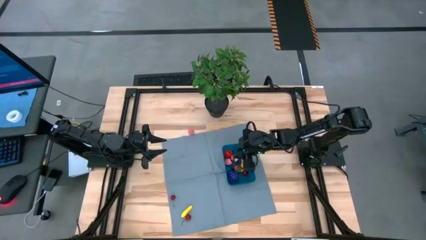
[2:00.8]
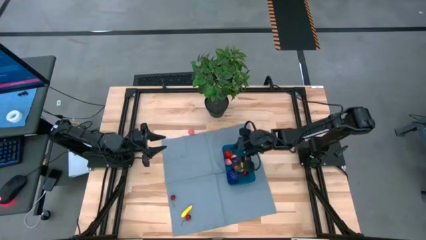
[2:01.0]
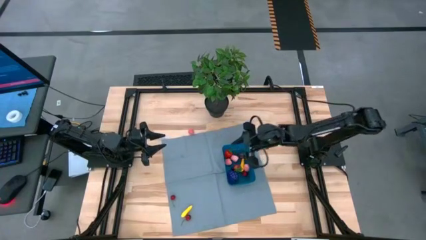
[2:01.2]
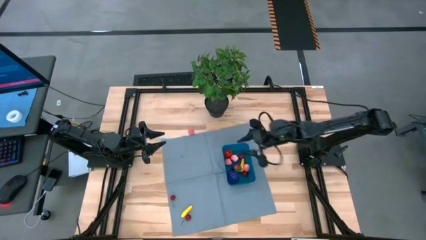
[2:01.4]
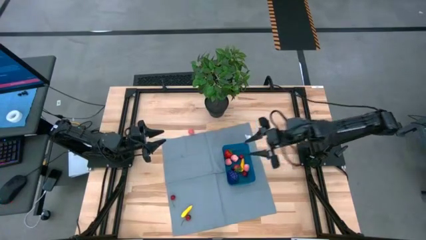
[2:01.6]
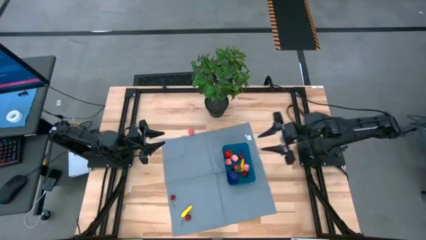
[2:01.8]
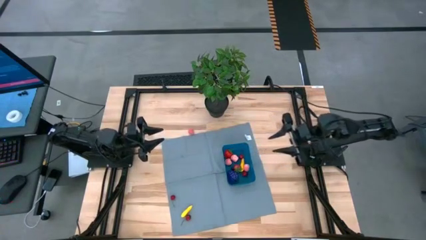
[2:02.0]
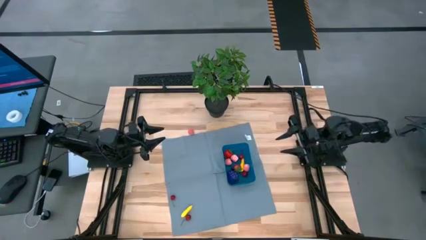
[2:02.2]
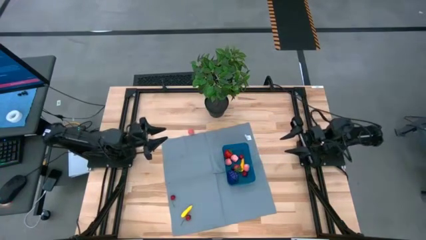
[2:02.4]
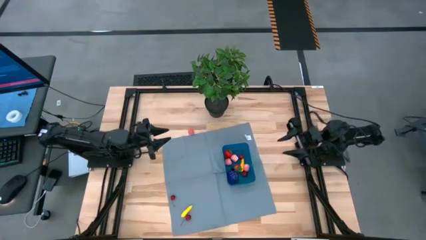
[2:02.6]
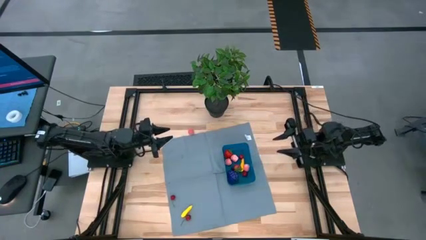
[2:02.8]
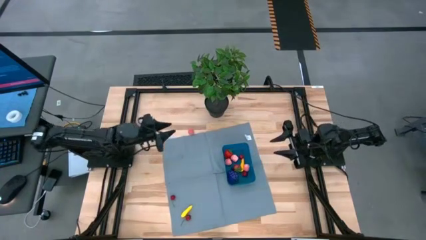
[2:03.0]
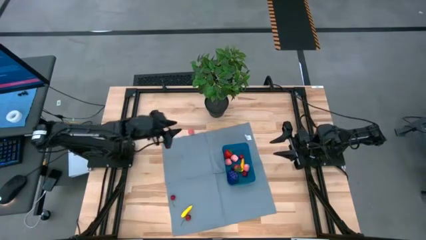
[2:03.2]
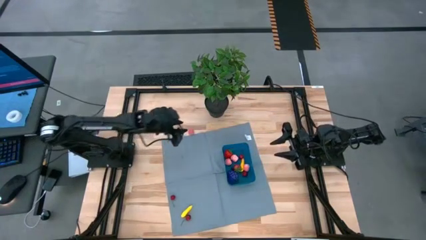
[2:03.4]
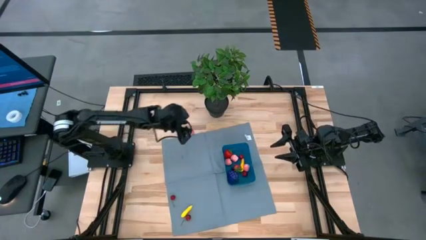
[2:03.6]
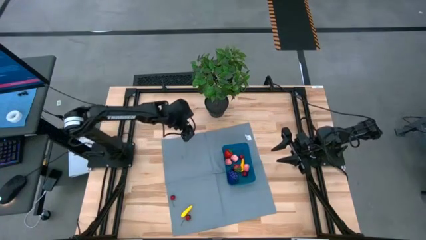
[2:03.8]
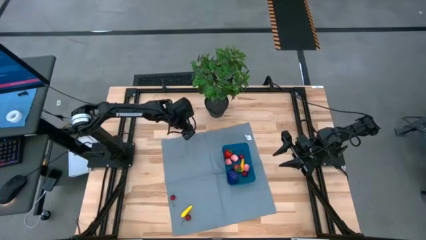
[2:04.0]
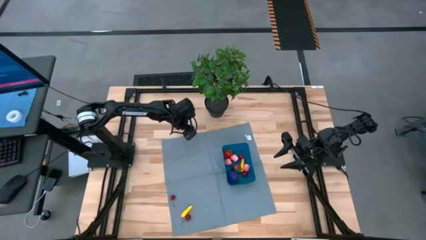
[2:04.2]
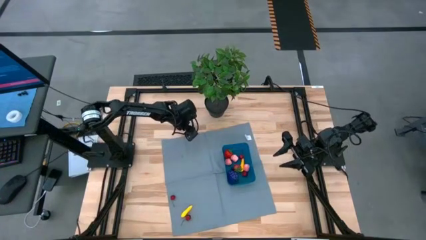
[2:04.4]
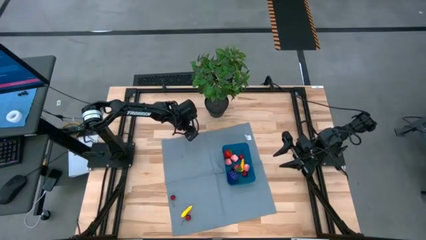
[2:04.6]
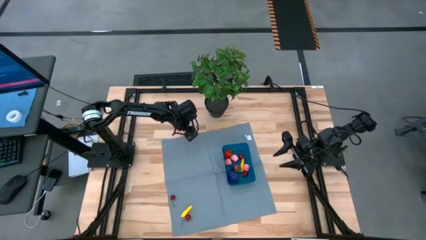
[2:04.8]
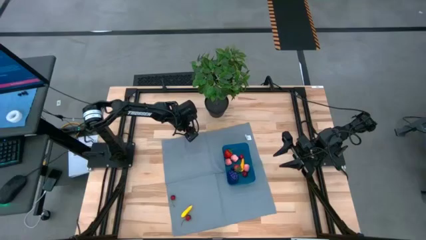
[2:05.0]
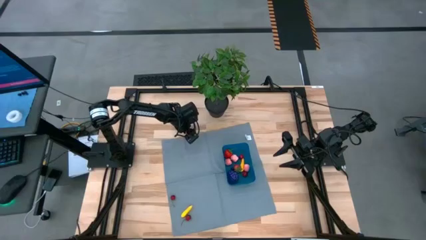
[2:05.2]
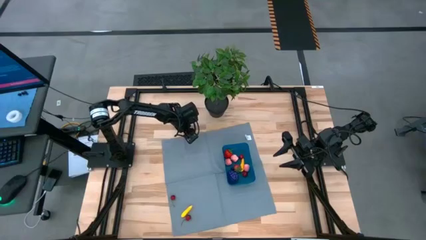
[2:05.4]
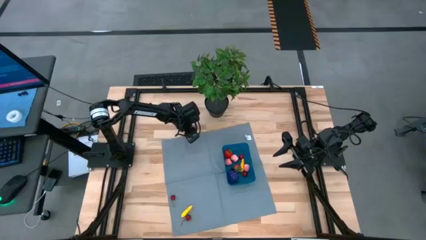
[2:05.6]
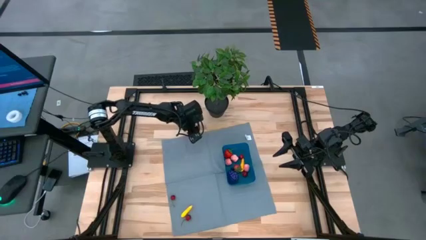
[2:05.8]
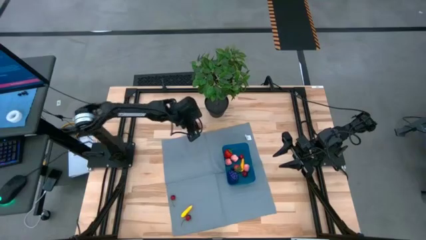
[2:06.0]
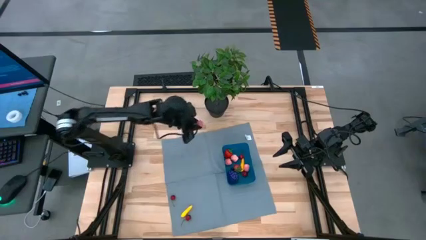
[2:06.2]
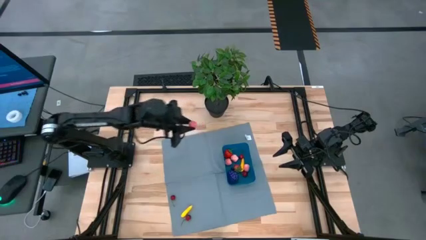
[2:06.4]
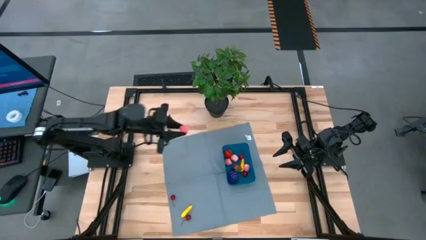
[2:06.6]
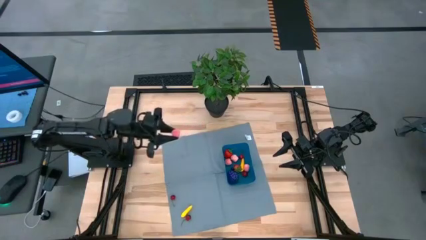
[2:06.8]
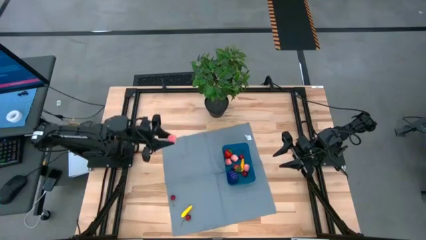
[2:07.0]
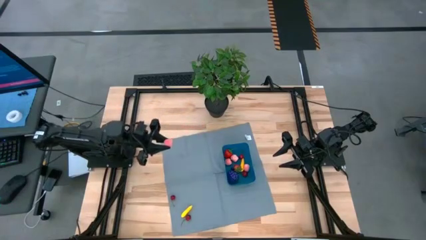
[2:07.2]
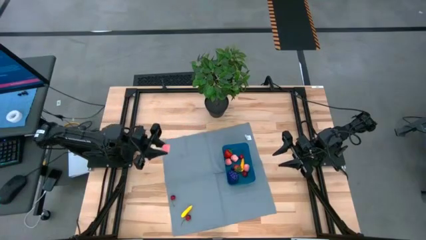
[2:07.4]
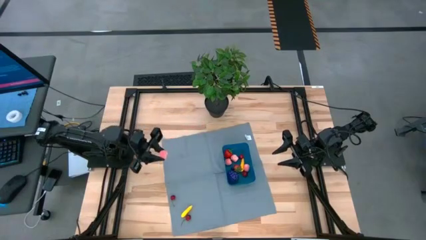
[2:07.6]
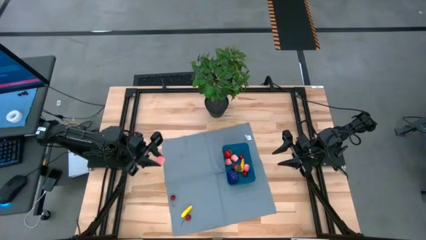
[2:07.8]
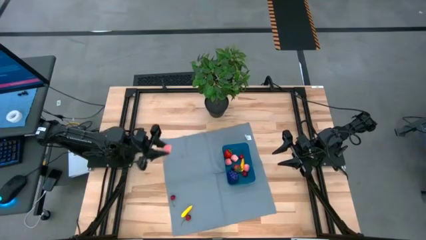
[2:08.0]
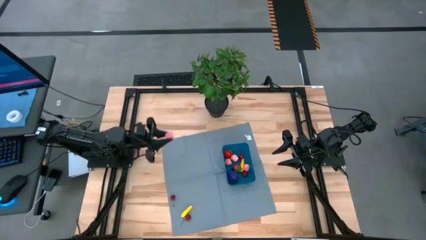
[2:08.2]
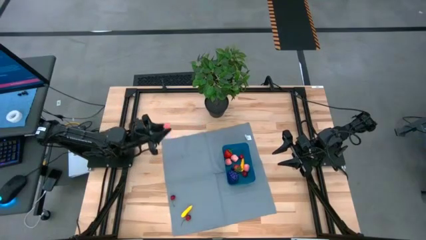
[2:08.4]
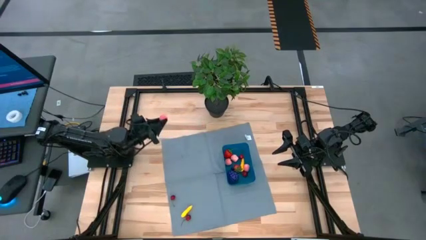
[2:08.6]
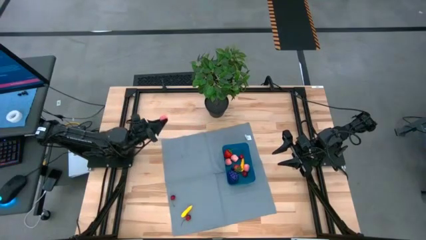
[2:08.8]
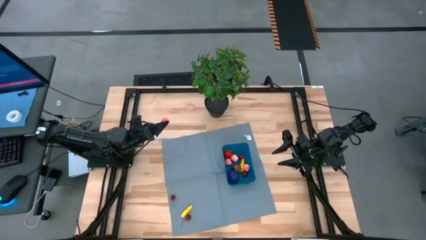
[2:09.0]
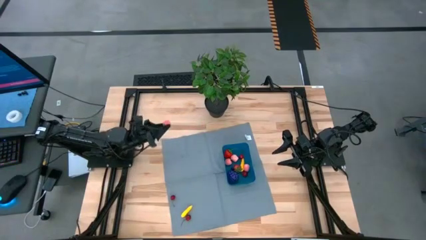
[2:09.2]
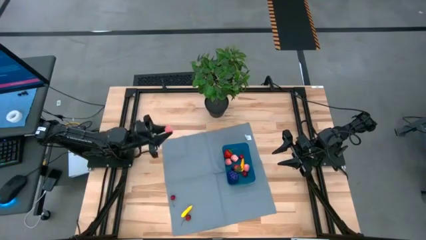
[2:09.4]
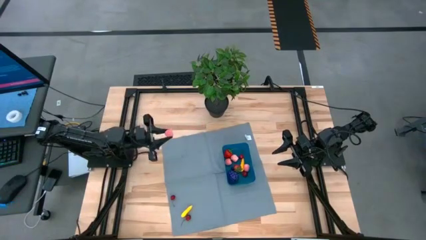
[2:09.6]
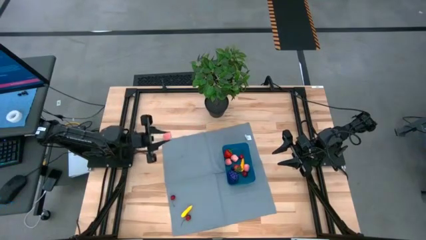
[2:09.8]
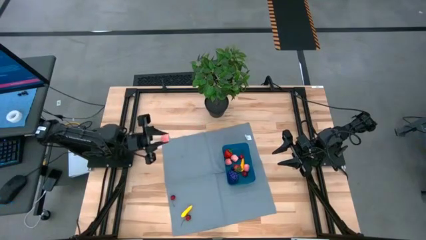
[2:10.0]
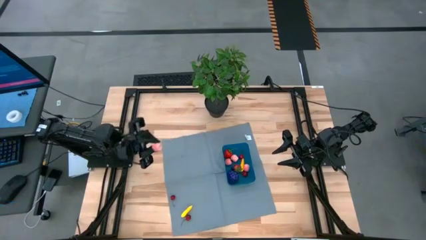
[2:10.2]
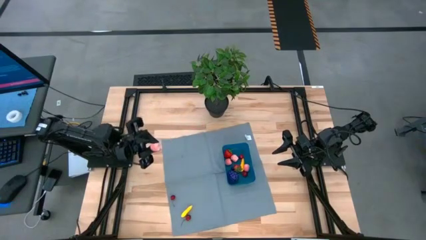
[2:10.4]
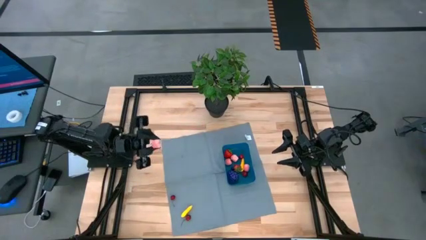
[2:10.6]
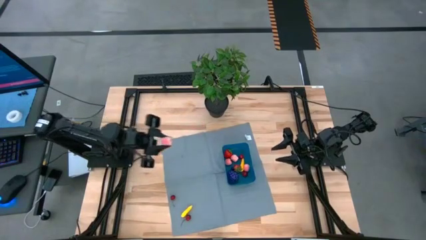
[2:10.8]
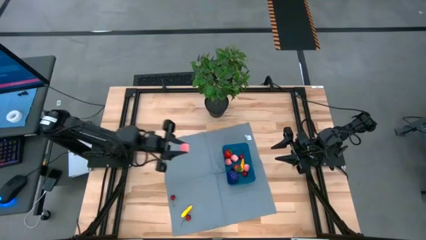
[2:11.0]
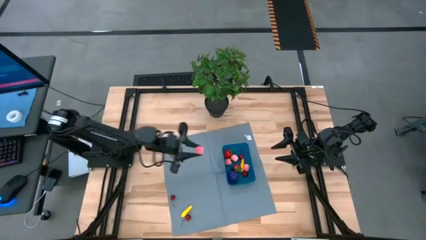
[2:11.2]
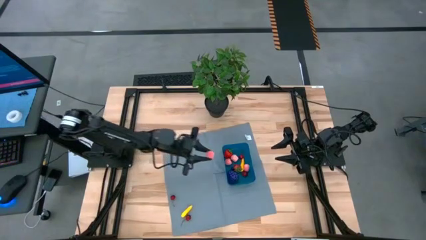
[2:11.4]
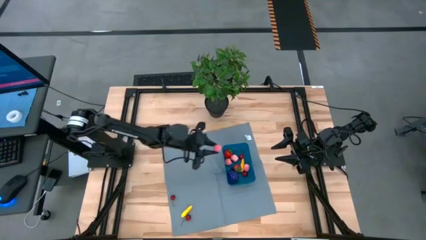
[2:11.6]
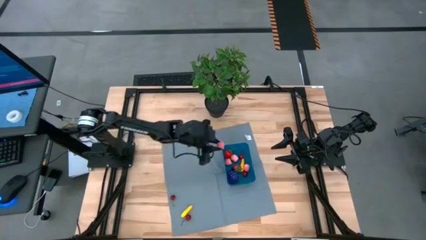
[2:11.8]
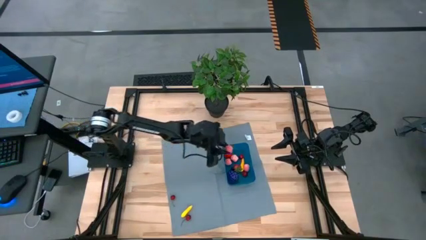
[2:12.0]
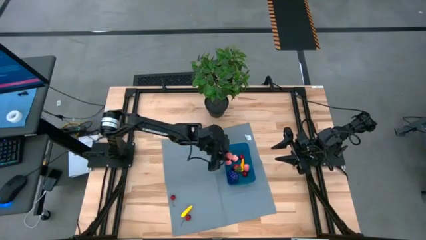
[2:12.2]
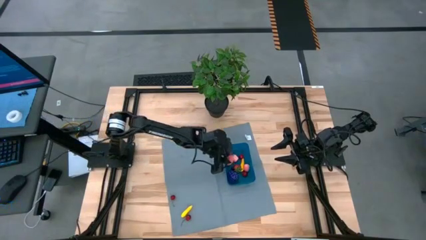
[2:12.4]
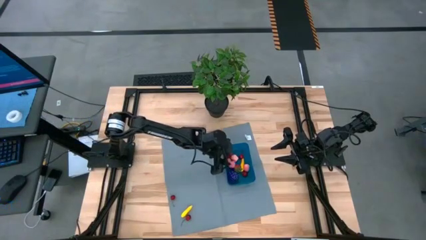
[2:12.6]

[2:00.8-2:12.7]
Task: Pick and placing Produce into tupperware
Put the peach into the bin
